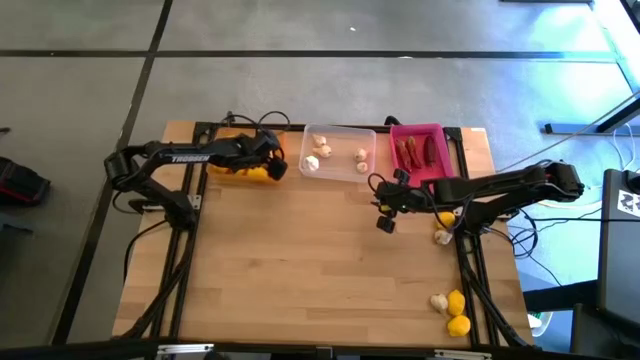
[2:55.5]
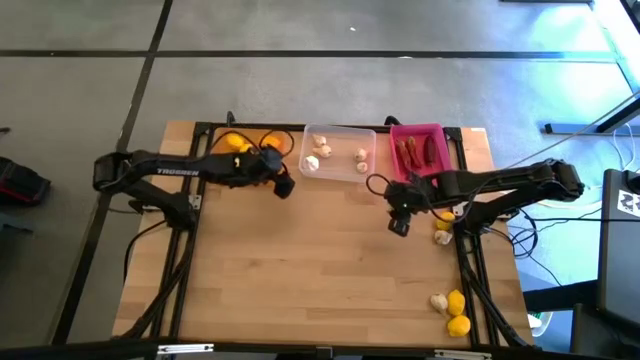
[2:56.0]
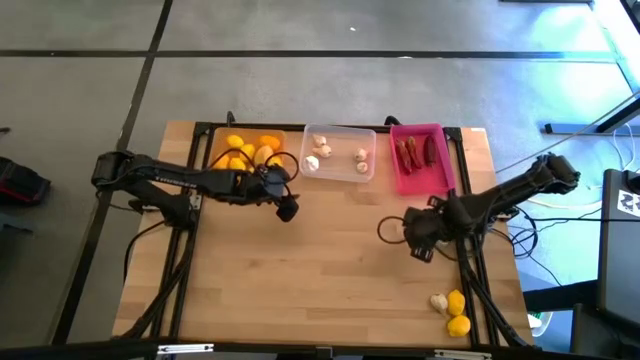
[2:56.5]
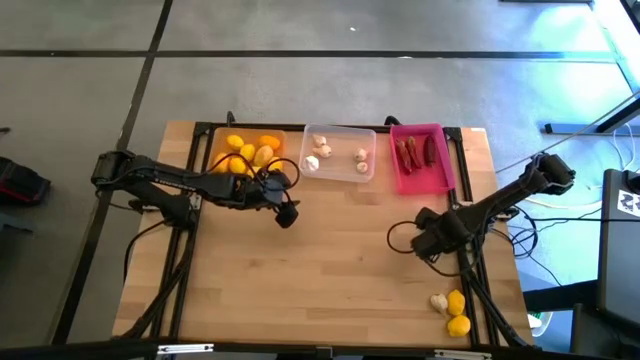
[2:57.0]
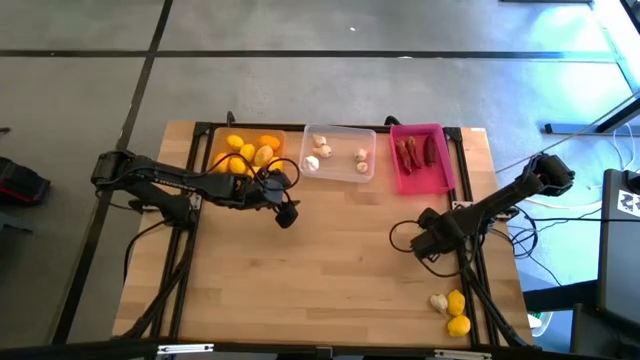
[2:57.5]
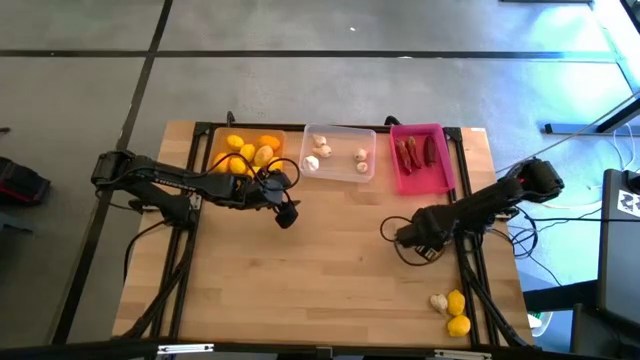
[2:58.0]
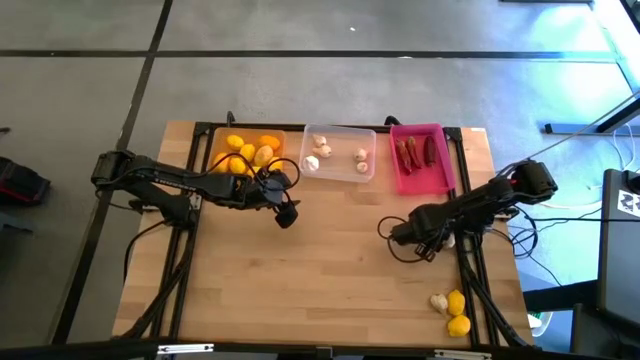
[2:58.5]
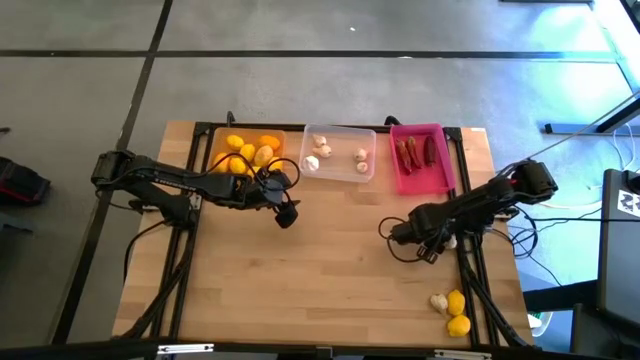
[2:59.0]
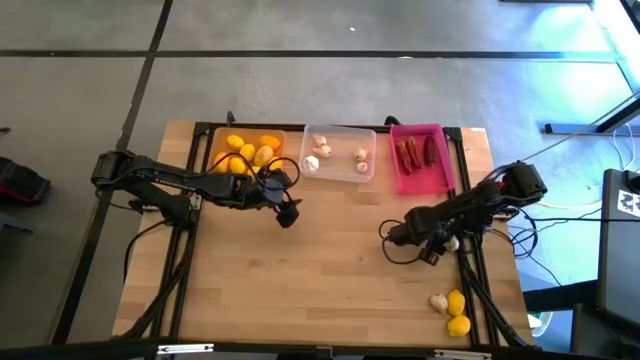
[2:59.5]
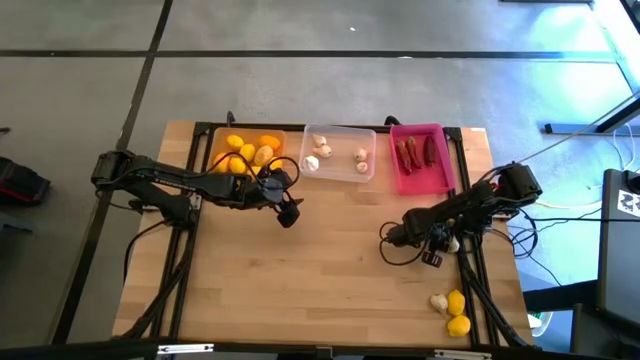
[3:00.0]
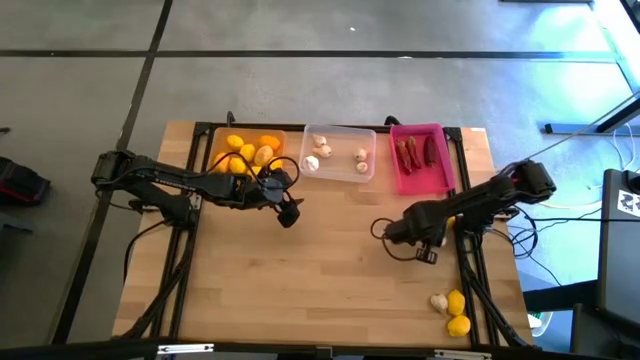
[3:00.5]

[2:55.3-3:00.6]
Task: Sort produce into baskets
Put the white garlic into the transparent bin

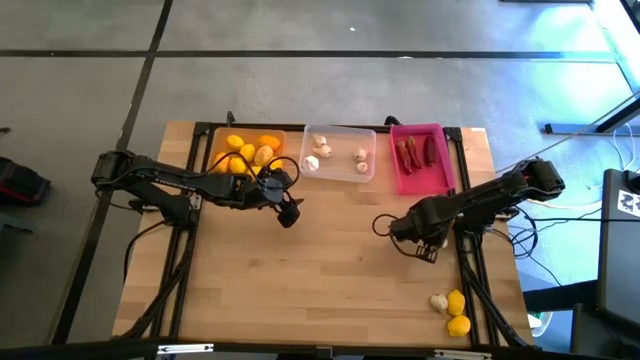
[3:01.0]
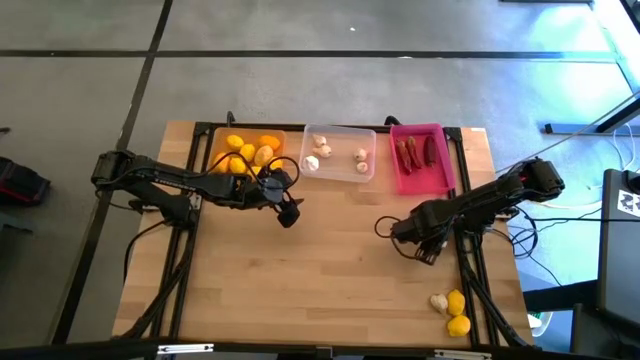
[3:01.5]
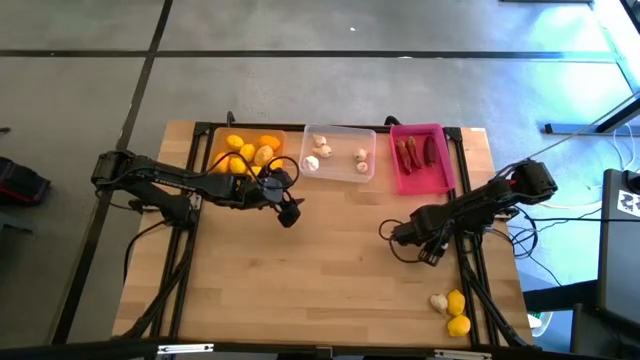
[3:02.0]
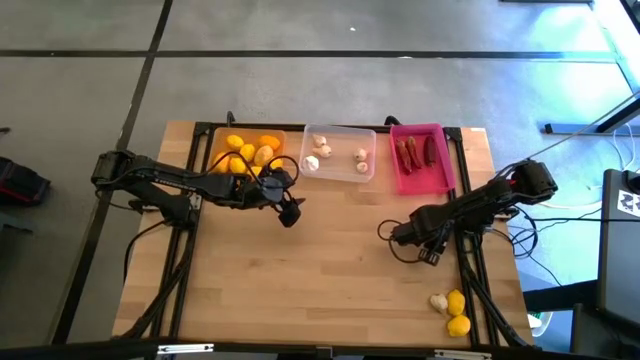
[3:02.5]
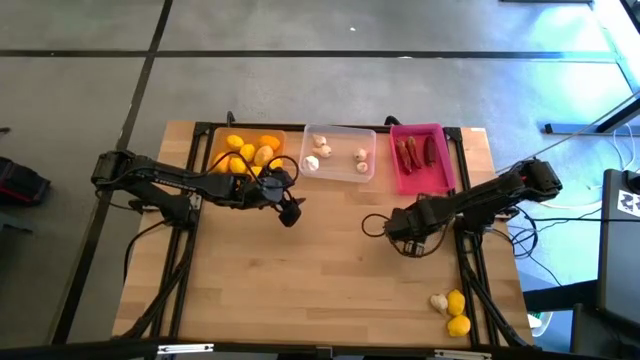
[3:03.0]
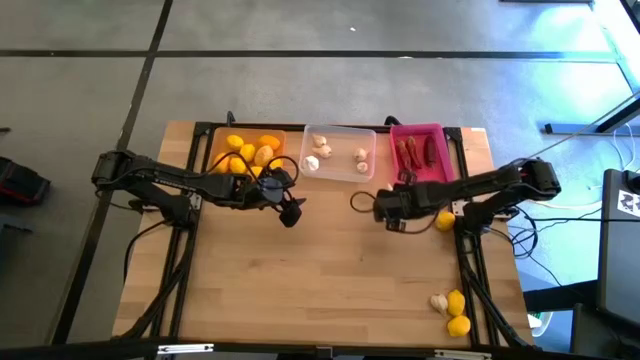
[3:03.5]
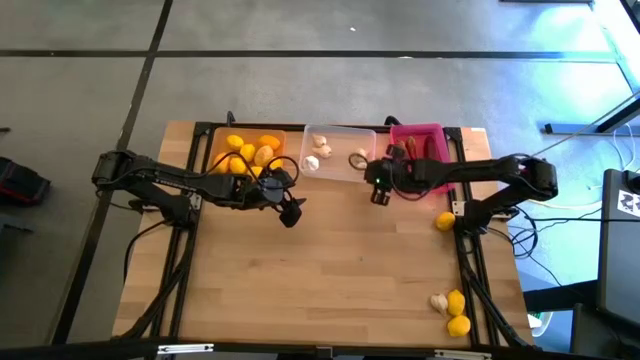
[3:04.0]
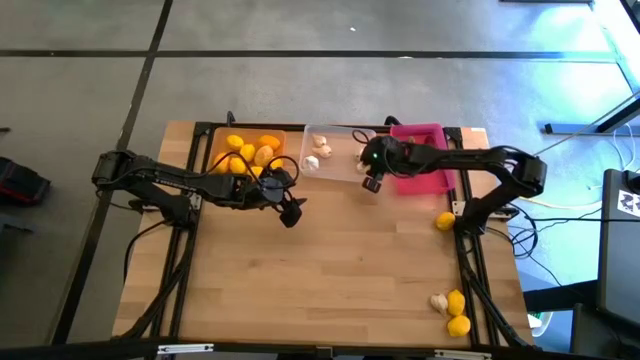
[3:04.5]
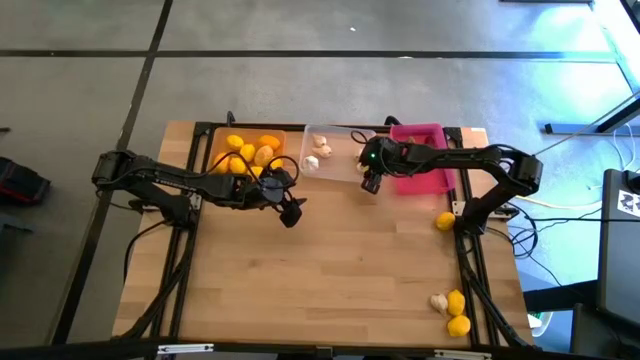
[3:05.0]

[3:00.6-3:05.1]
Put the white garlic into the transparent bin

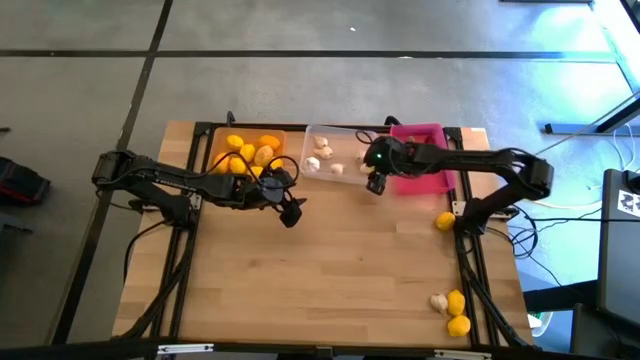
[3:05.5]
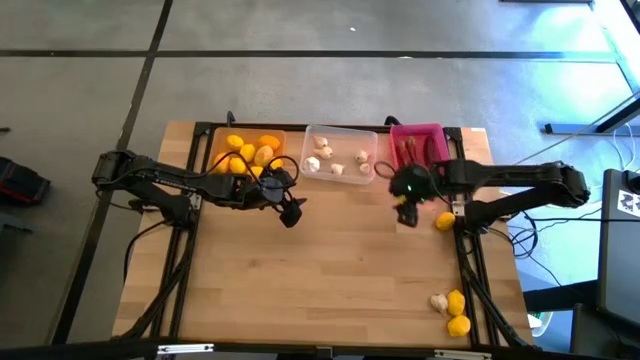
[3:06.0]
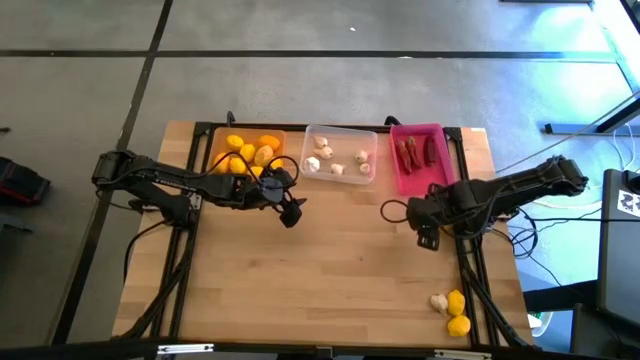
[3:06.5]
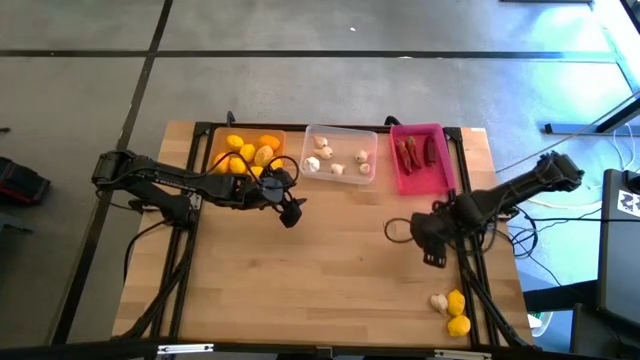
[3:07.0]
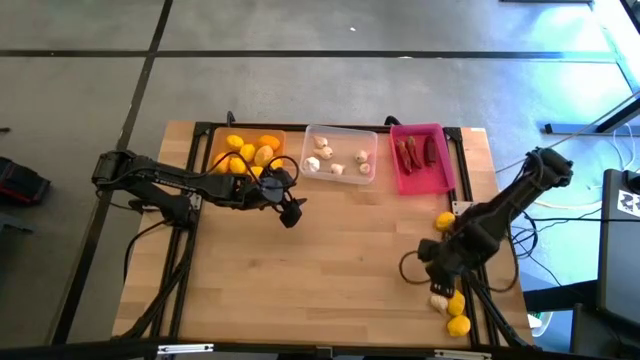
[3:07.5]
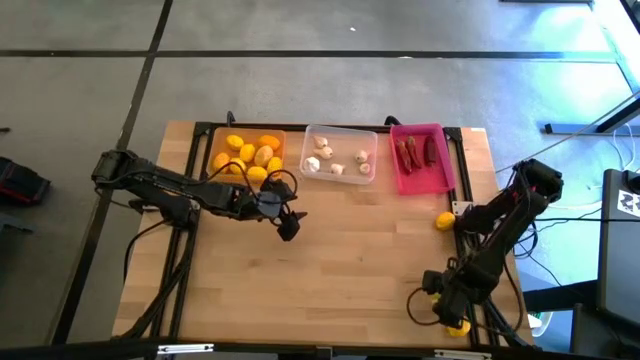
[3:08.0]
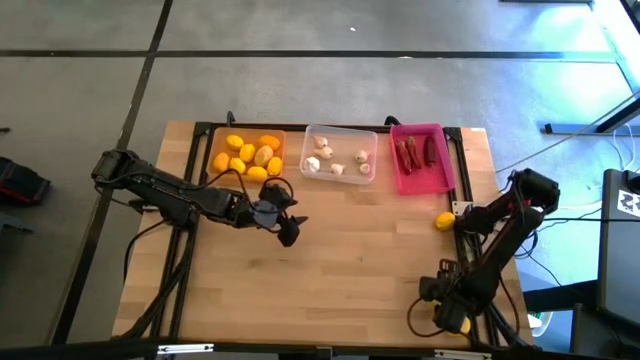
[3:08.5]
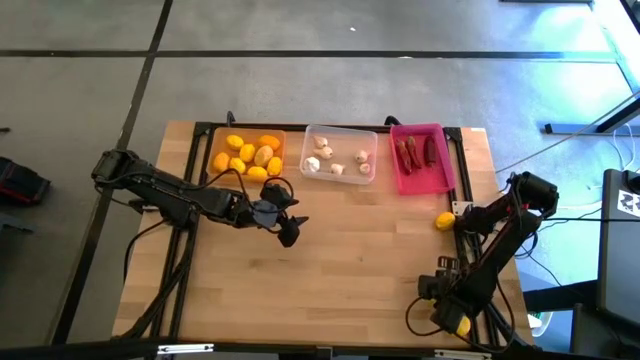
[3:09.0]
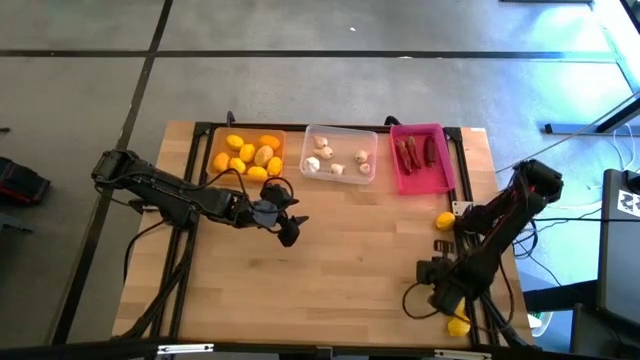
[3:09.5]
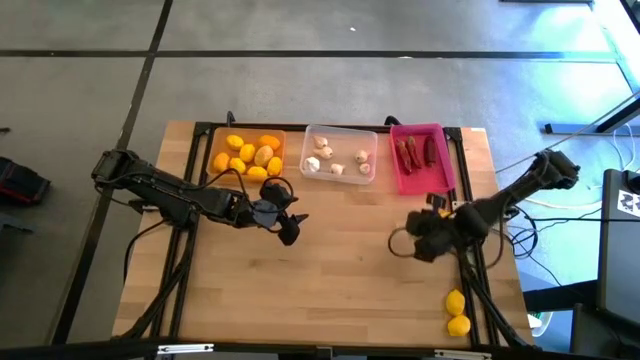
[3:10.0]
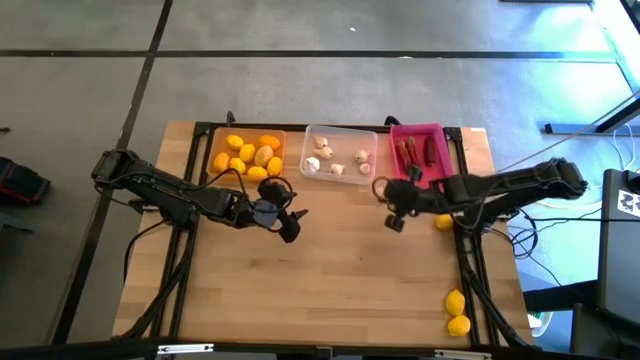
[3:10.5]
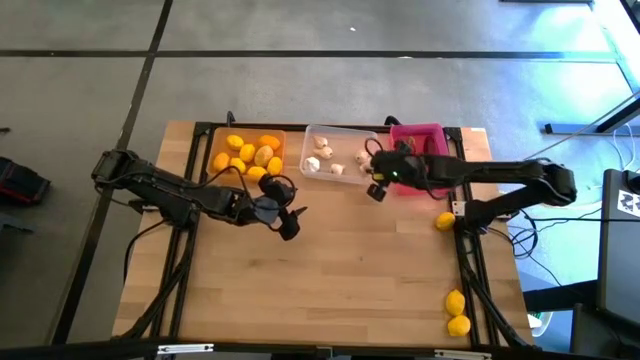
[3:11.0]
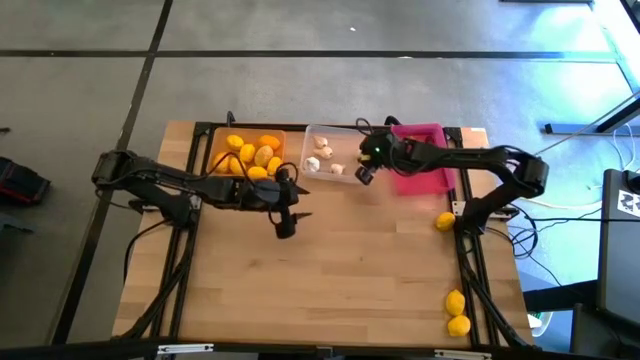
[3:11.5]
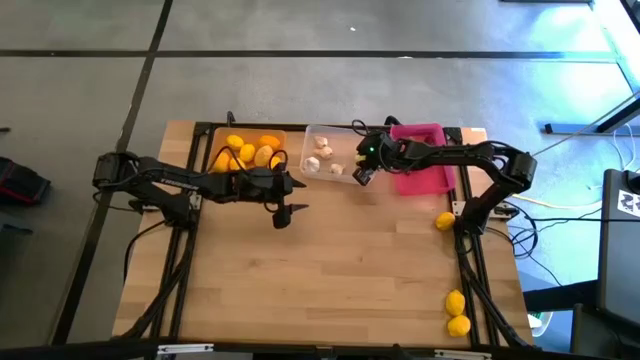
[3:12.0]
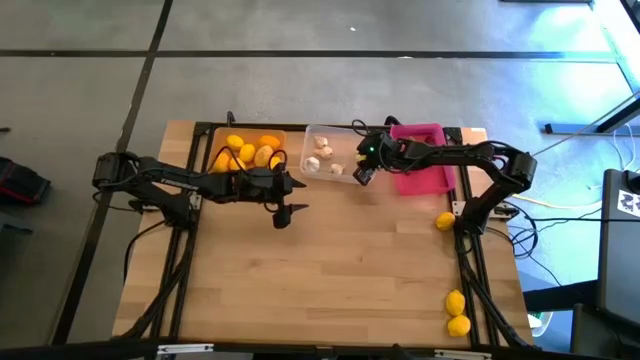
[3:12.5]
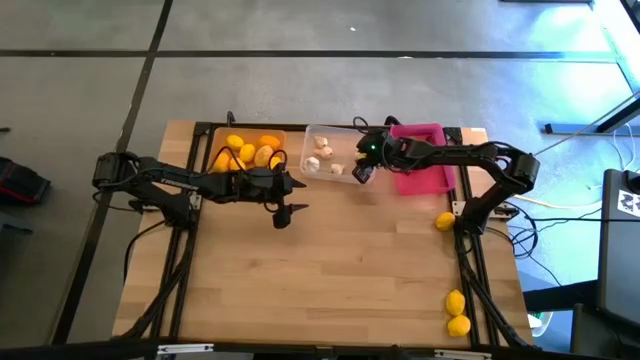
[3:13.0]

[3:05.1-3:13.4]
Put the white garlic into the transparent bin

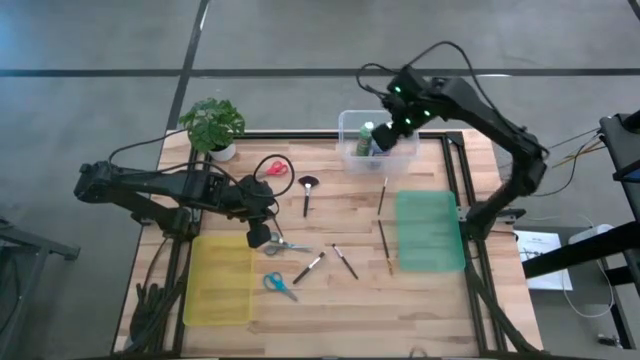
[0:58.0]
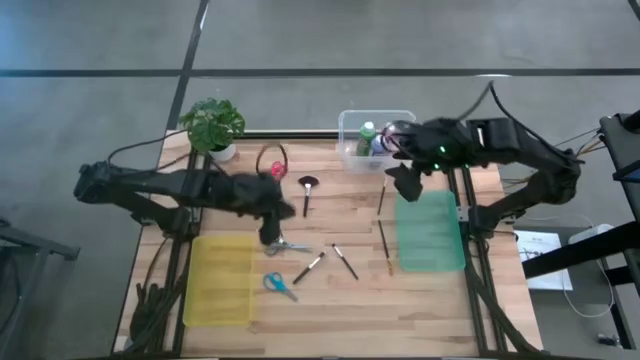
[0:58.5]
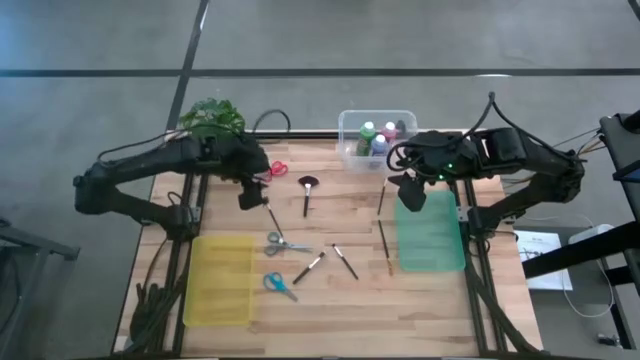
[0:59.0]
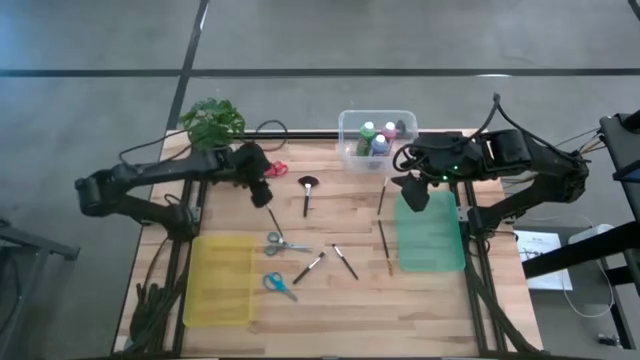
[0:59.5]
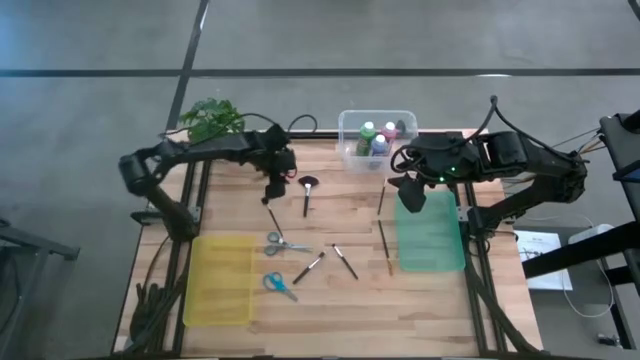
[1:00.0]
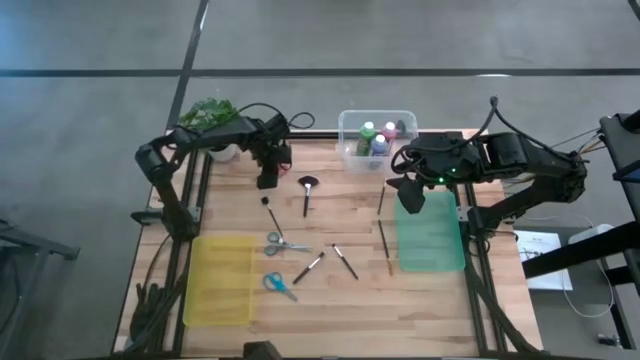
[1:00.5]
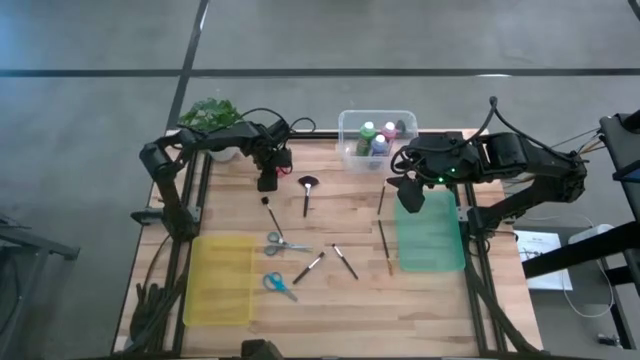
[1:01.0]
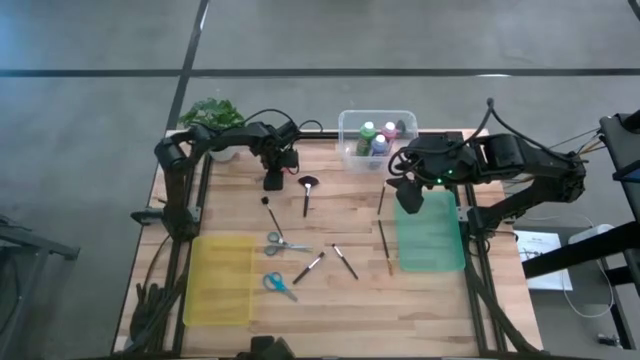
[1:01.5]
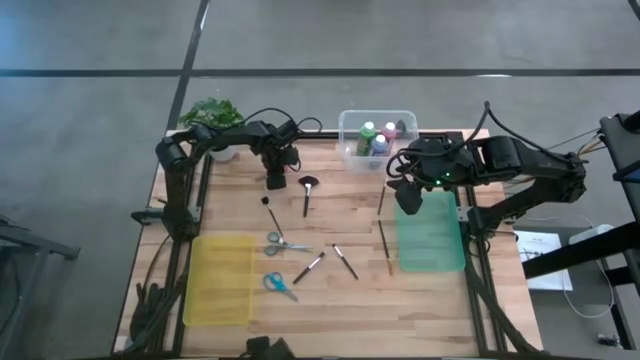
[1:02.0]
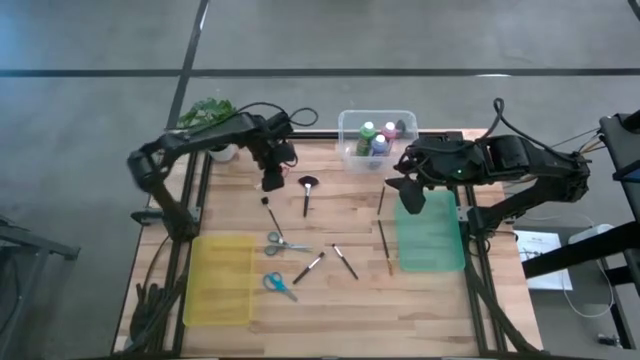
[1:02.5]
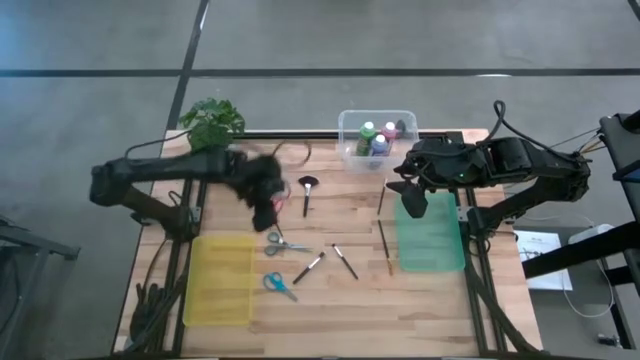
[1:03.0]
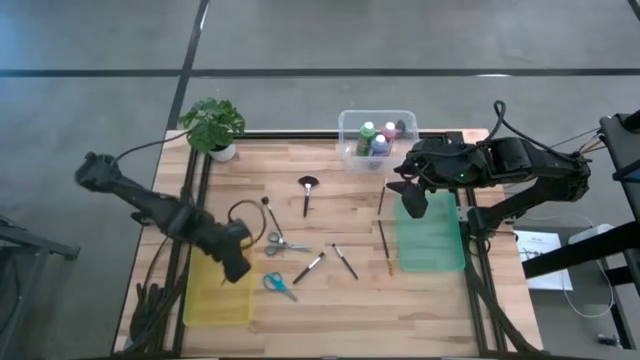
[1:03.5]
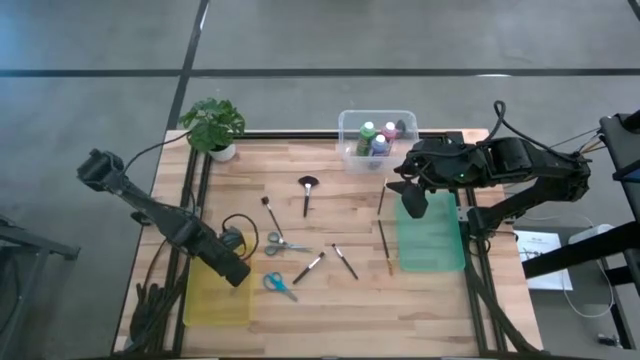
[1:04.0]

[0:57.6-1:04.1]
Task: Pick & Place Paint Supplies
Put the red scissors into the yellow bin
